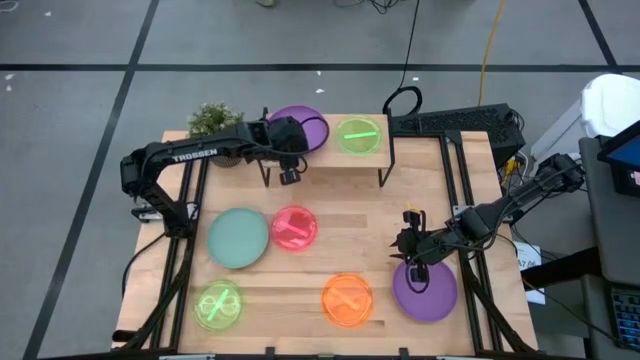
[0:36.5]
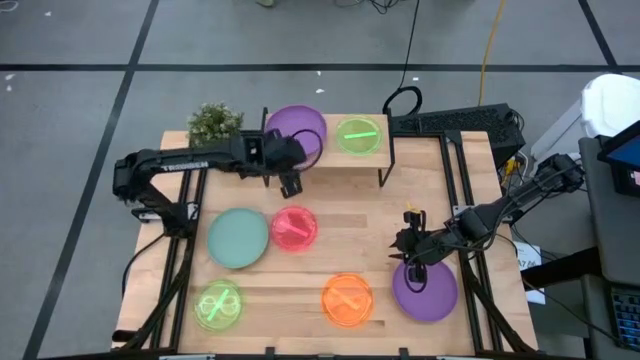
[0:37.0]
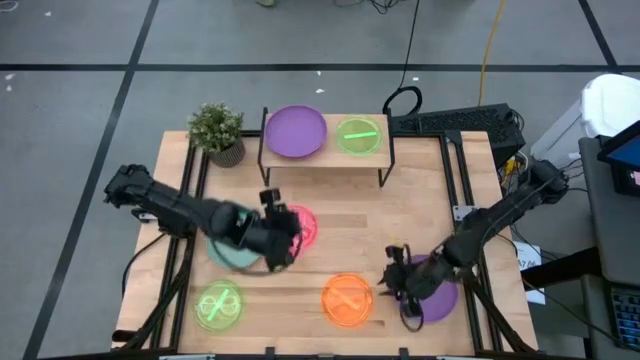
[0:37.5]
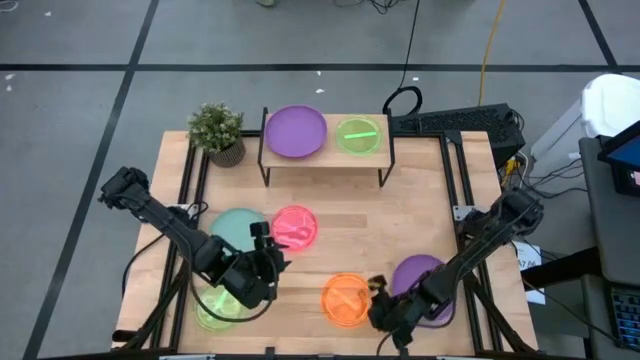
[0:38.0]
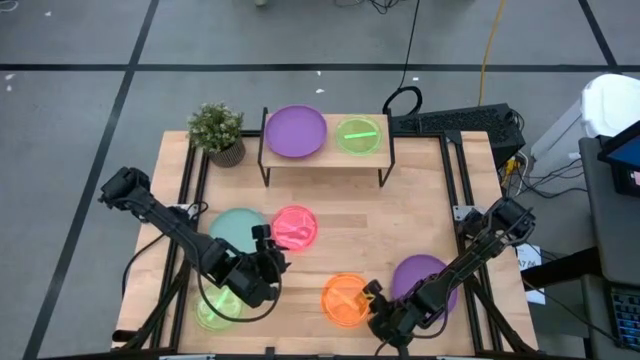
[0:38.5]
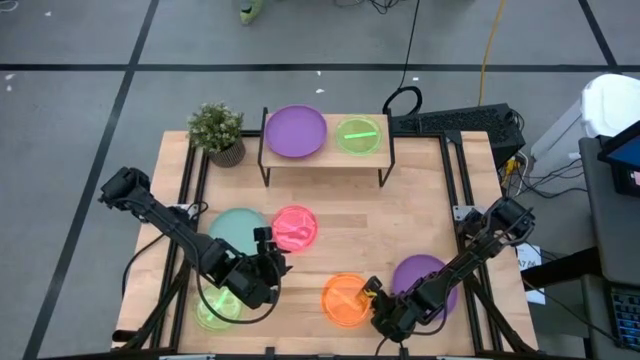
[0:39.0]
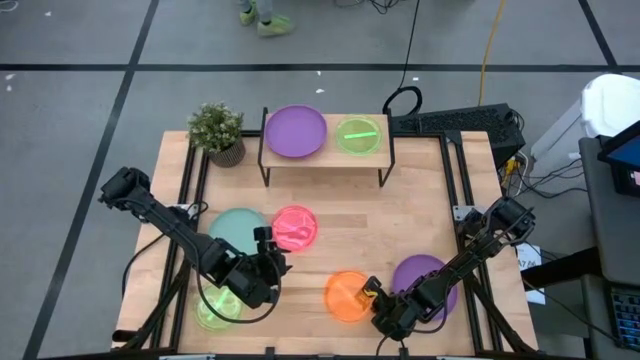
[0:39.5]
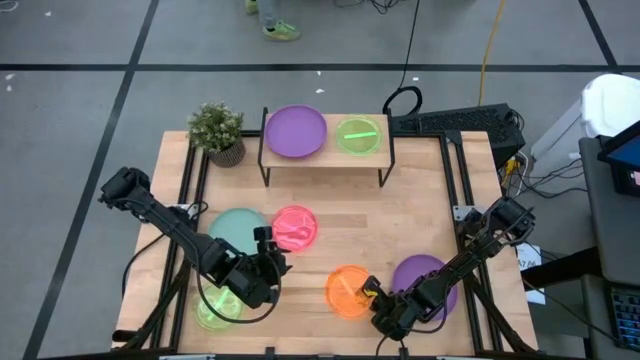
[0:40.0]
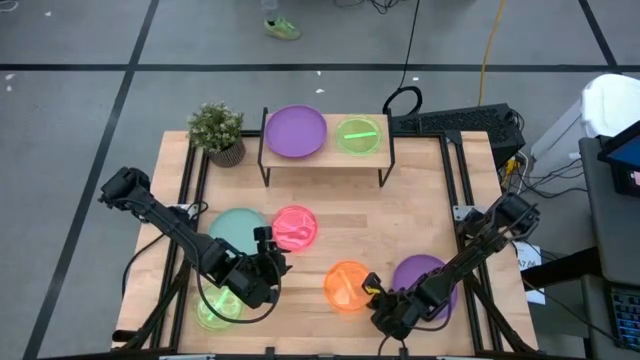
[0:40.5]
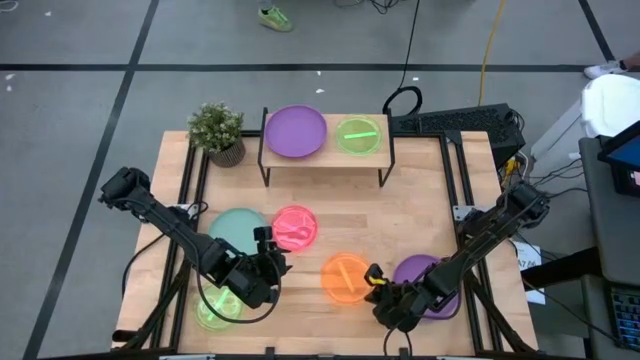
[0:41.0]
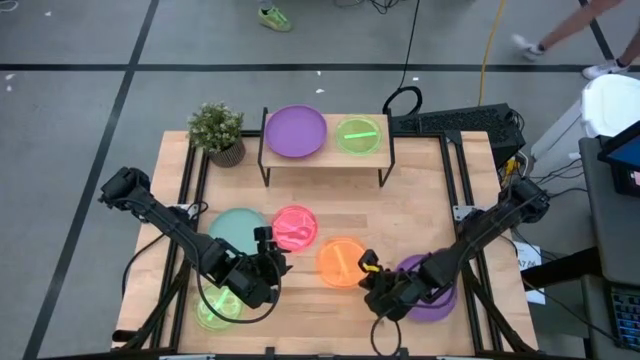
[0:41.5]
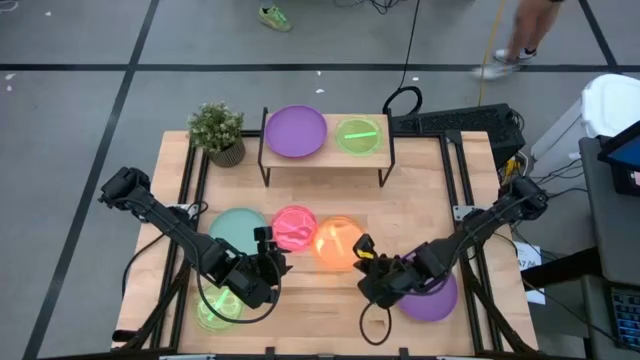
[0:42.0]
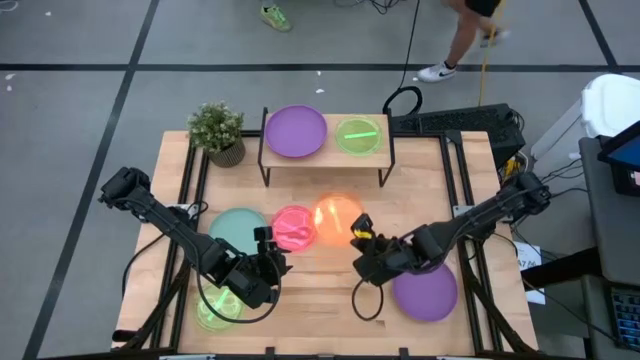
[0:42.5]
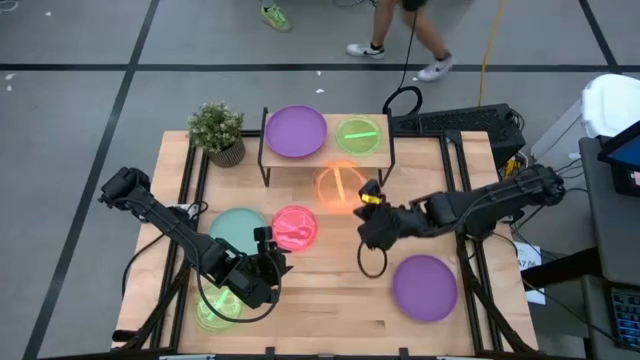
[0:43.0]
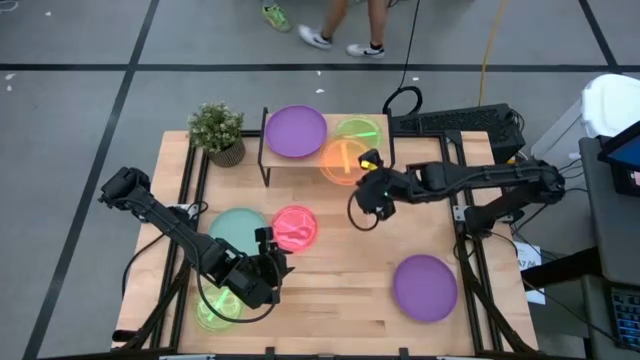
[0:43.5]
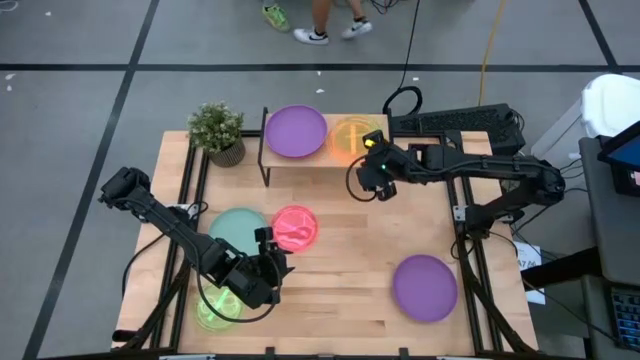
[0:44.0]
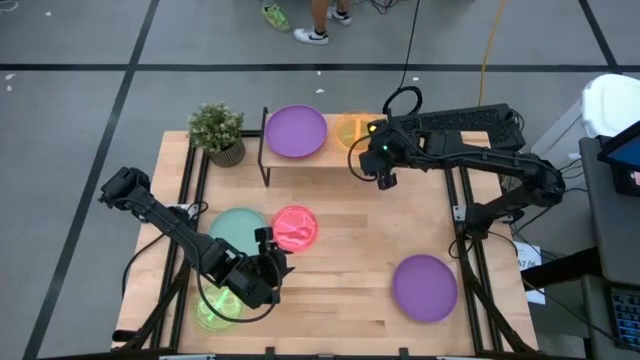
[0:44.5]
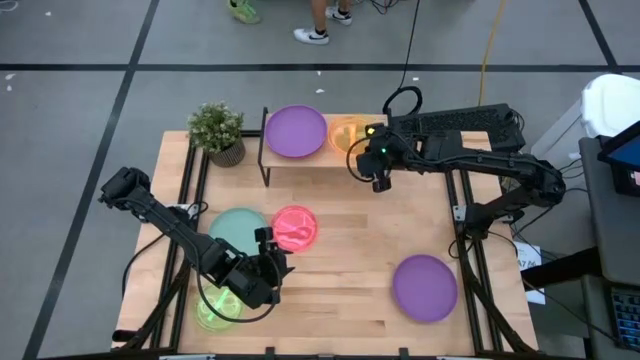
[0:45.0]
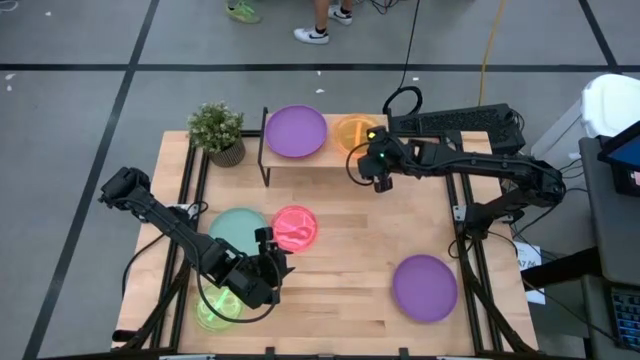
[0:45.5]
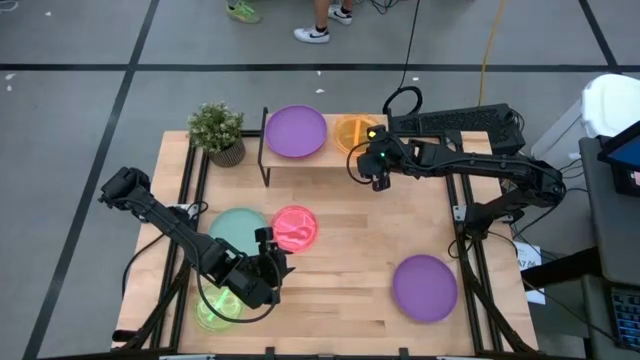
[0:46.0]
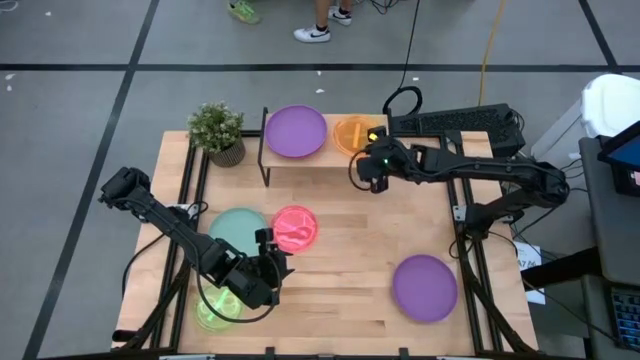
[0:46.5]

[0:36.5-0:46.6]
Task: Place and stack plates onto a shelf
Stack the transparent orange plate on top of the transparent green plate on the shelf

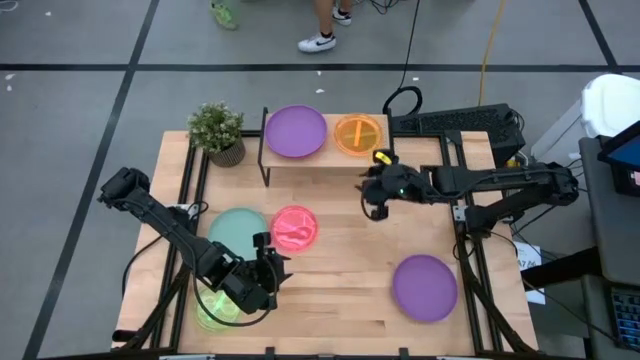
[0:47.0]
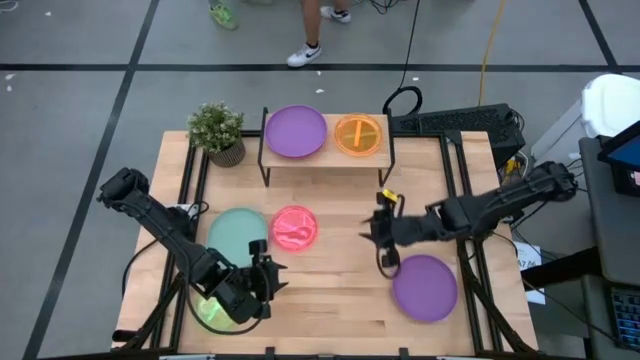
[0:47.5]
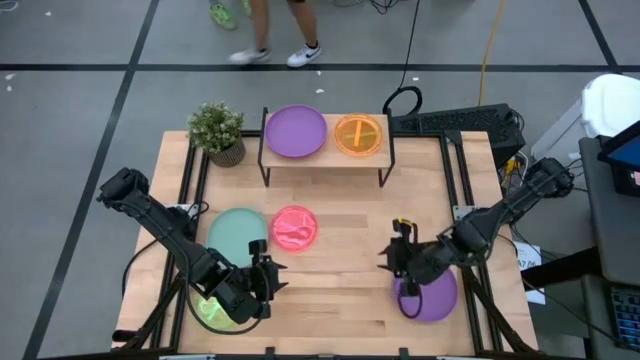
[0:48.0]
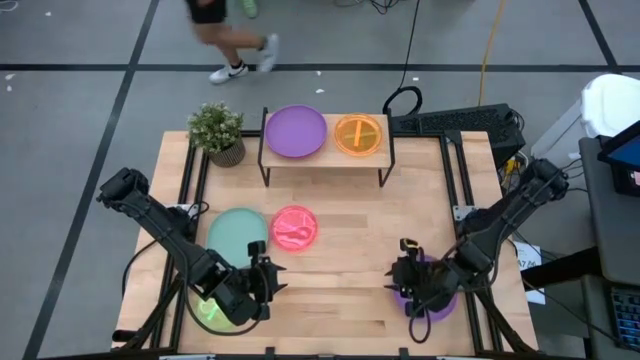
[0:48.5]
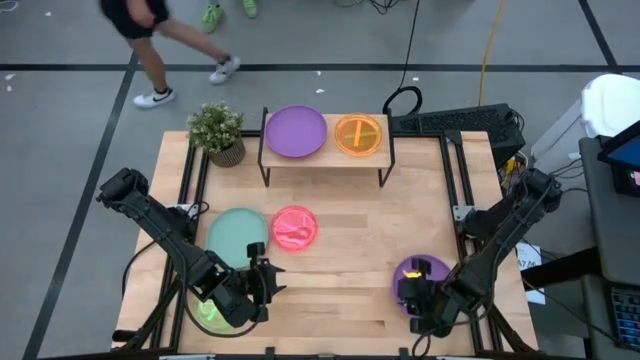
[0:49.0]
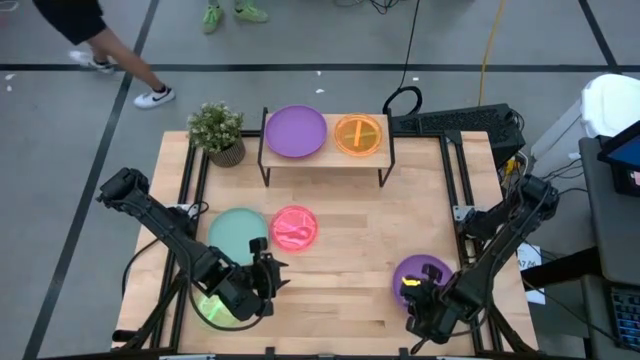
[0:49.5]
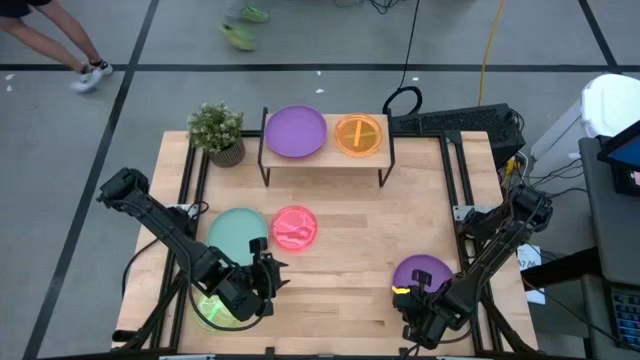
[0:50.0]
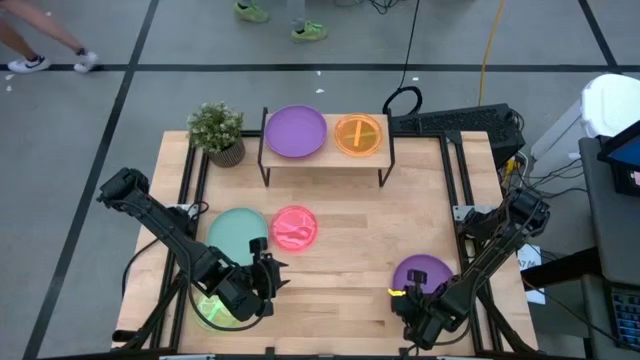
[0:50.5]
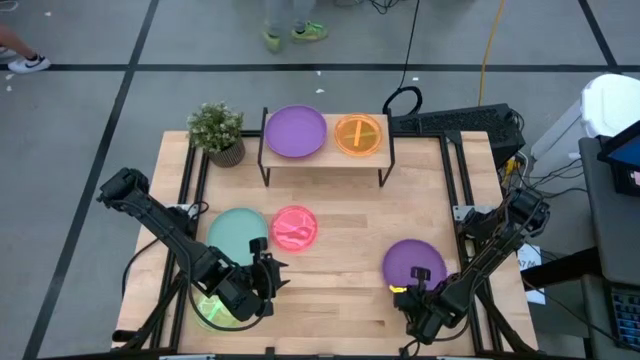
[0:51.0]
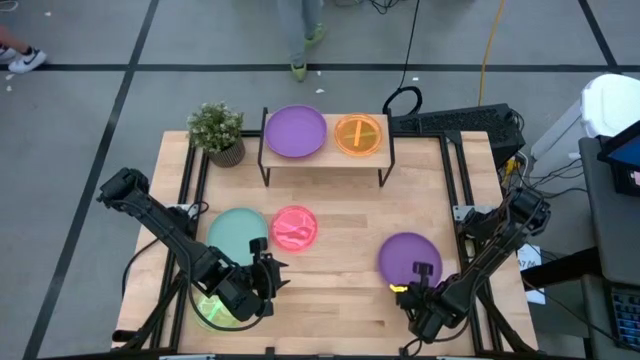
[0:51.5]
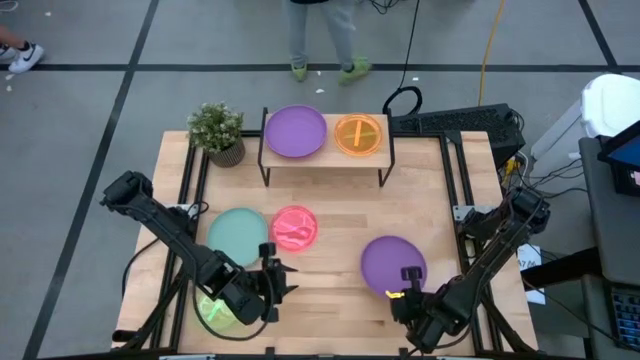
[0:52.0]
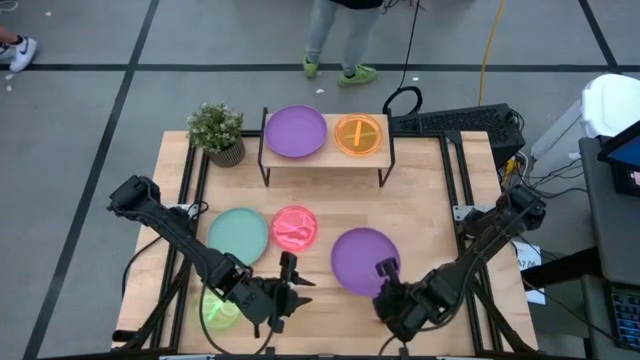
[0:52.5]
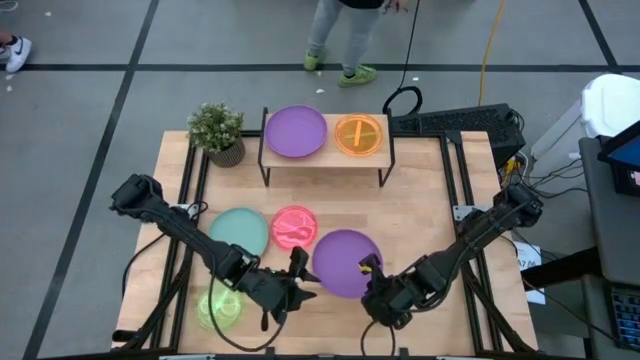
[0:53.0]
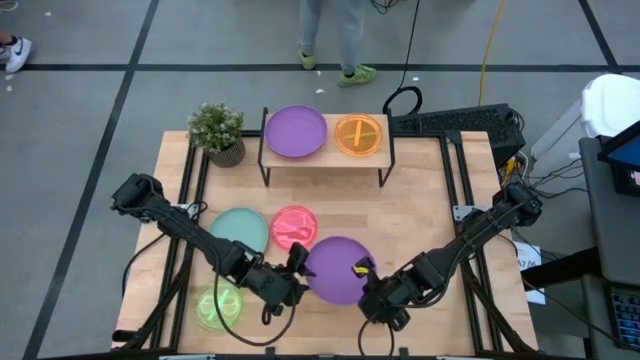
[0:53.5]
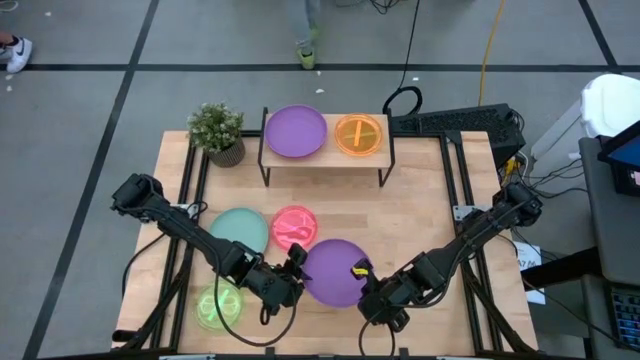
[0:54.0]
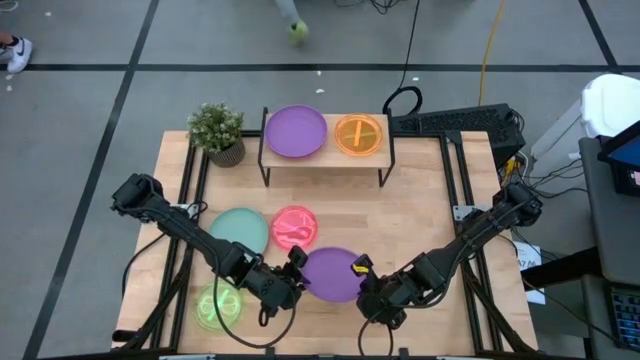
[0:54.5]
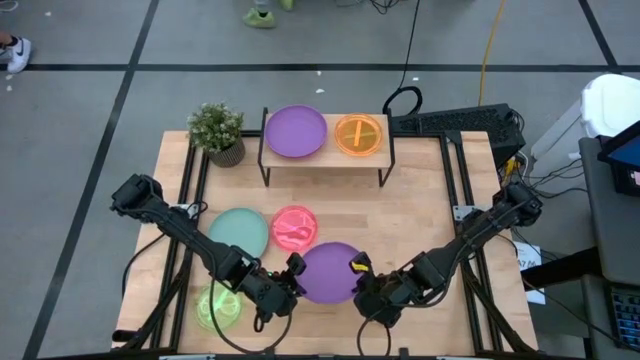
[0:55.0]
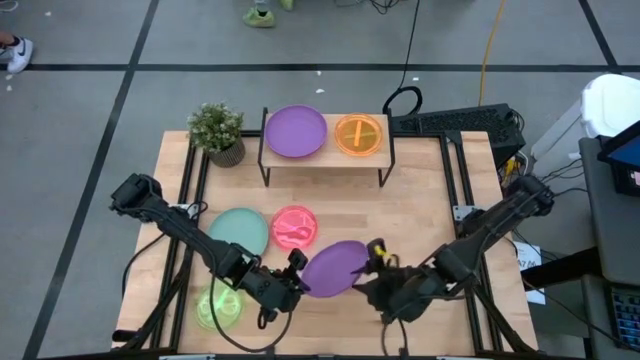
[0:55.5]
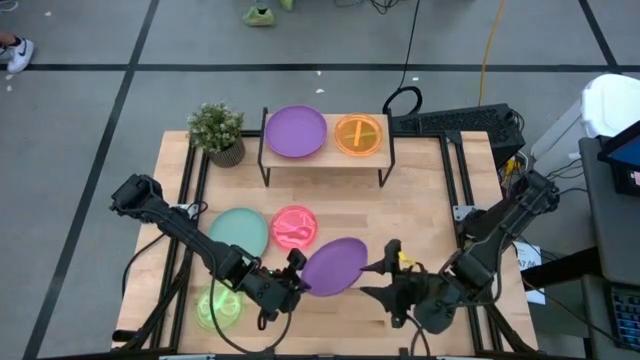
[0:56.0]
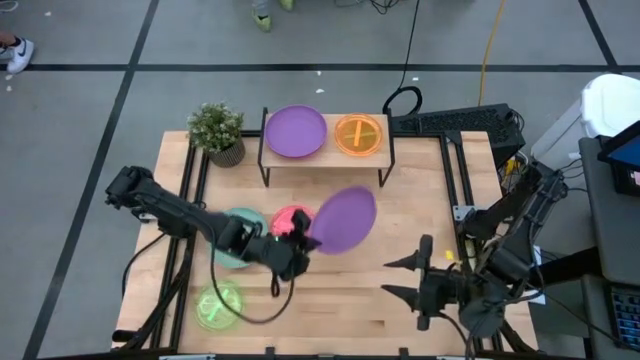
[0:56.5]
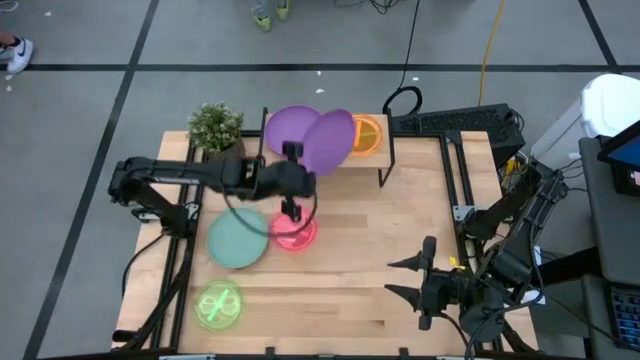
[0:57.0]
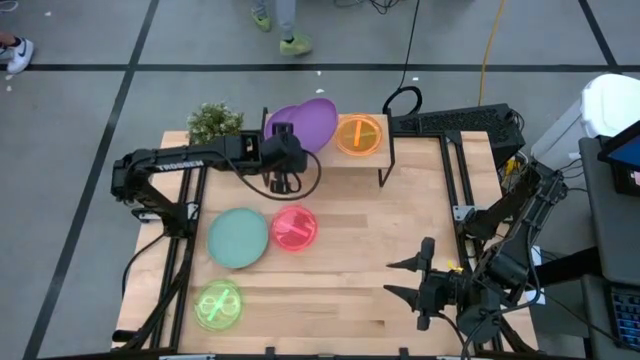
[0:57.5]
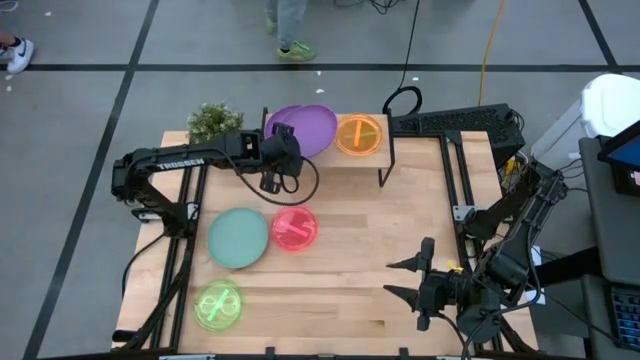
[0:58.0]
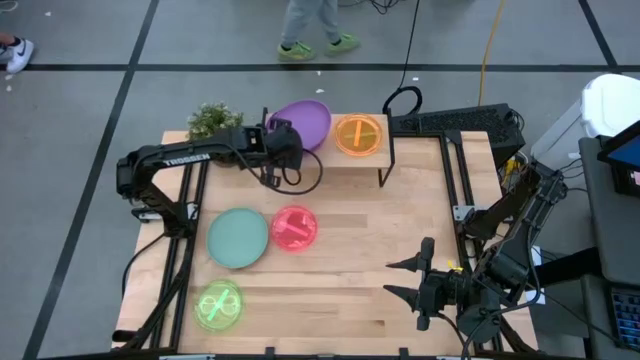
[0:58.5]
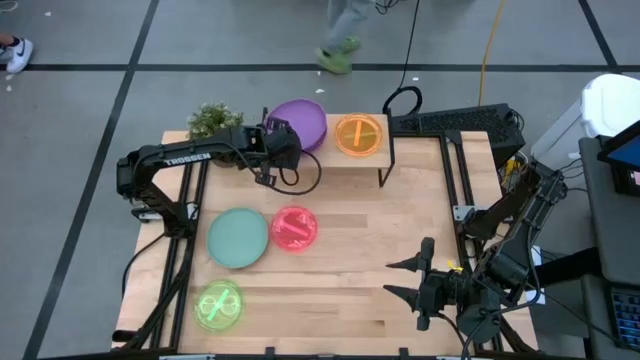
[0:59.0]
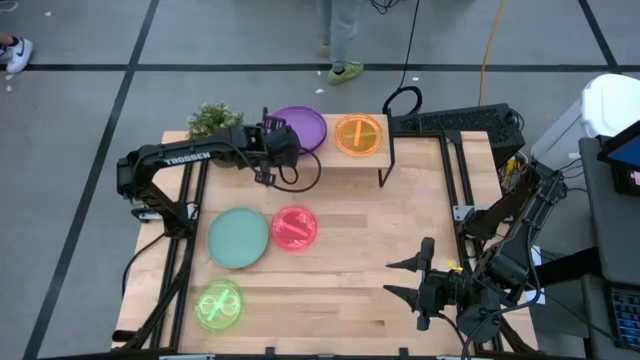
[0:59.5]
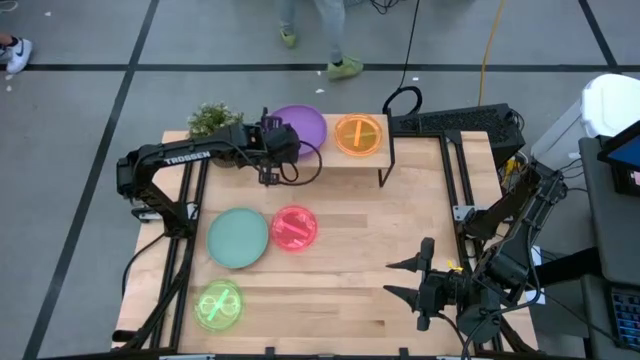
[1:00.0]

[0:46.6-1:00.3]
Stack the purple plate on top of the other purple plate on the shelf
